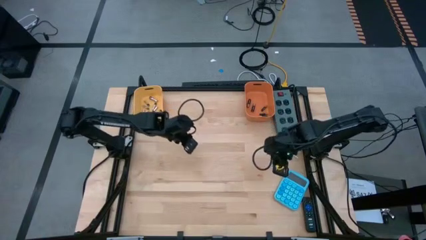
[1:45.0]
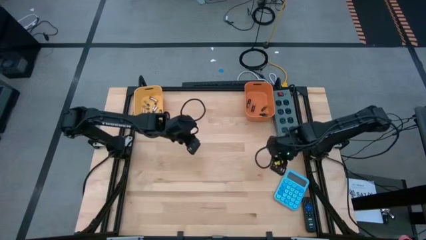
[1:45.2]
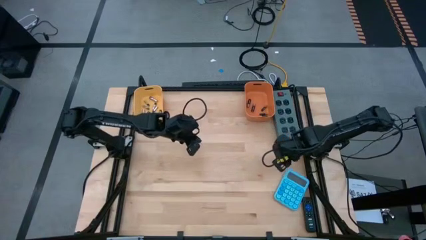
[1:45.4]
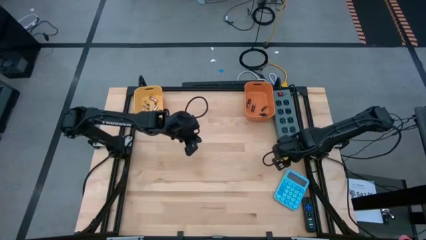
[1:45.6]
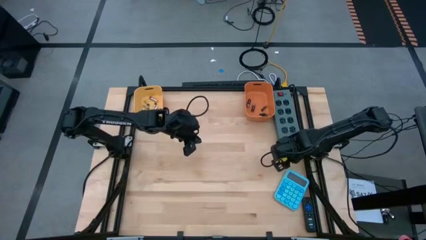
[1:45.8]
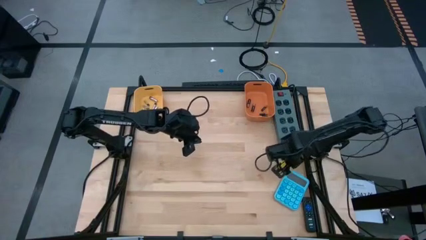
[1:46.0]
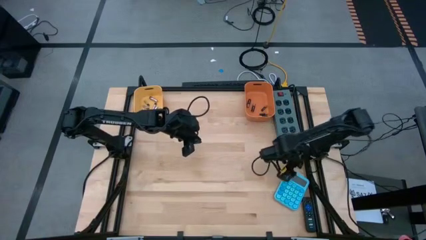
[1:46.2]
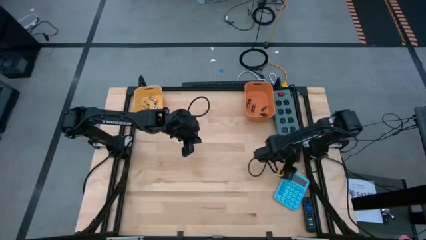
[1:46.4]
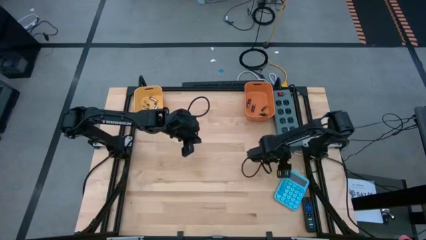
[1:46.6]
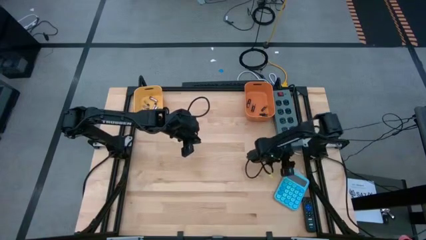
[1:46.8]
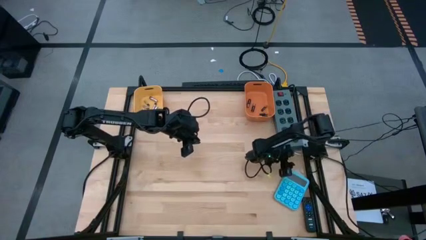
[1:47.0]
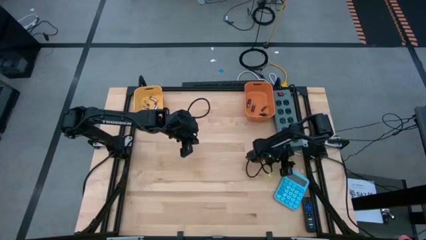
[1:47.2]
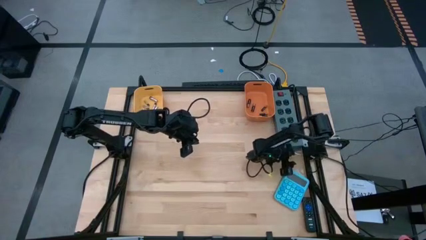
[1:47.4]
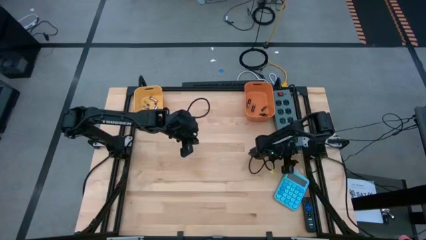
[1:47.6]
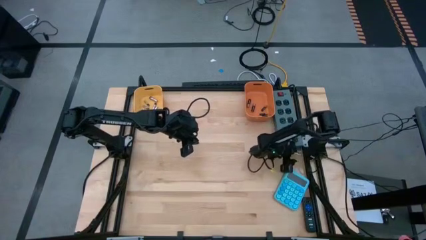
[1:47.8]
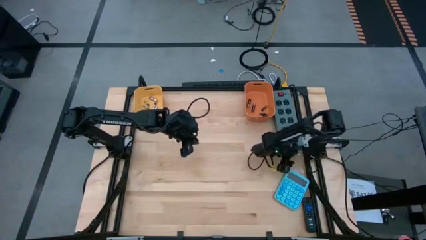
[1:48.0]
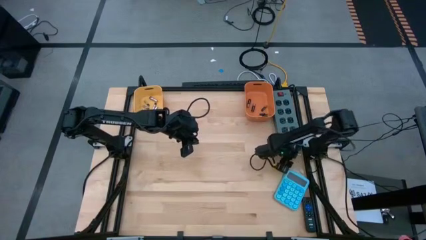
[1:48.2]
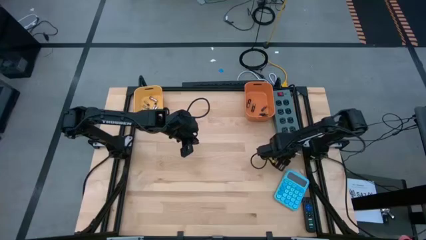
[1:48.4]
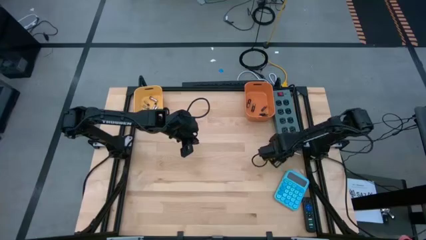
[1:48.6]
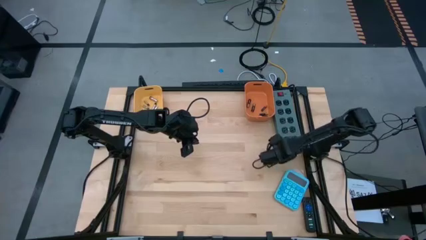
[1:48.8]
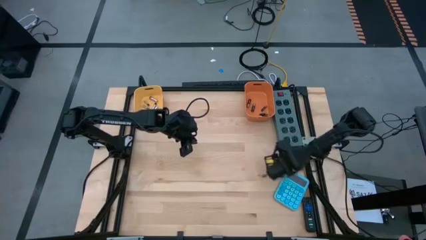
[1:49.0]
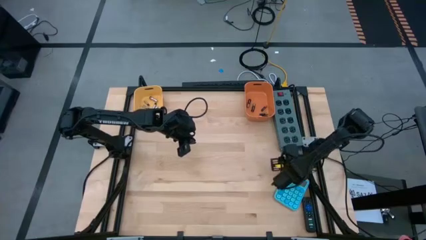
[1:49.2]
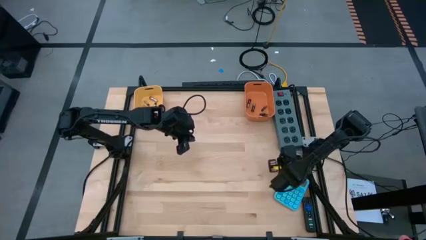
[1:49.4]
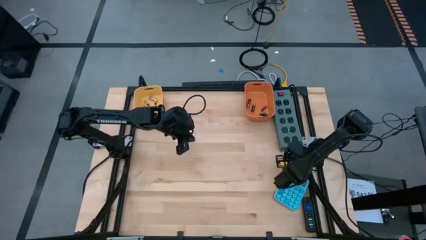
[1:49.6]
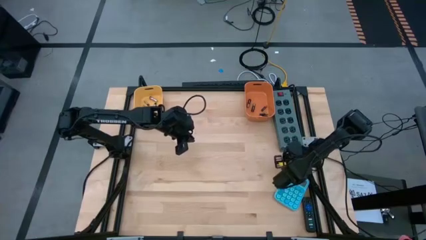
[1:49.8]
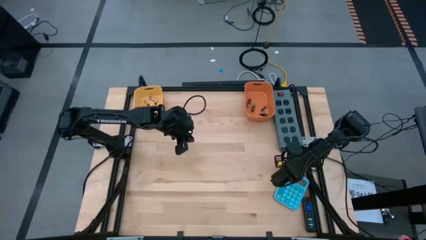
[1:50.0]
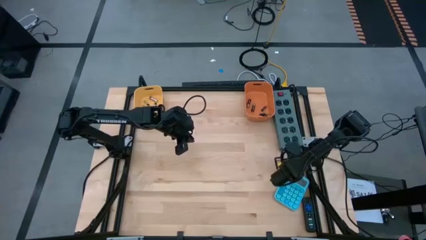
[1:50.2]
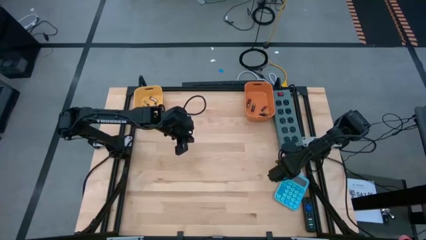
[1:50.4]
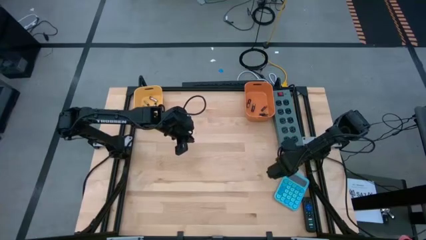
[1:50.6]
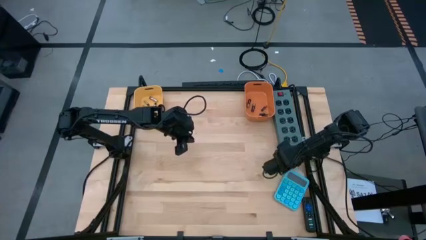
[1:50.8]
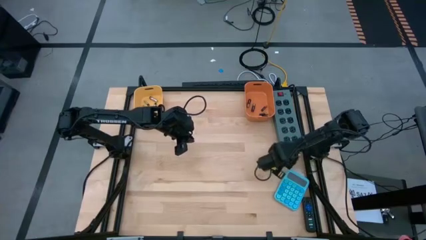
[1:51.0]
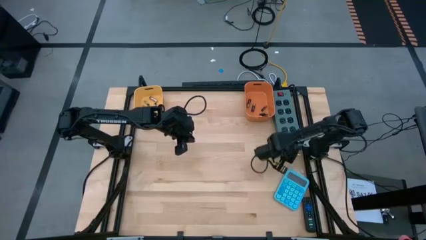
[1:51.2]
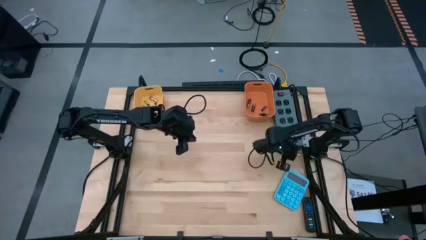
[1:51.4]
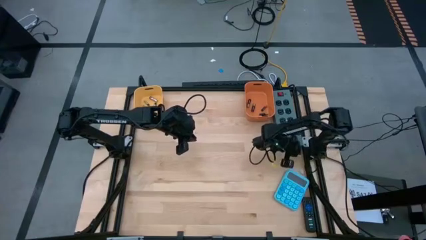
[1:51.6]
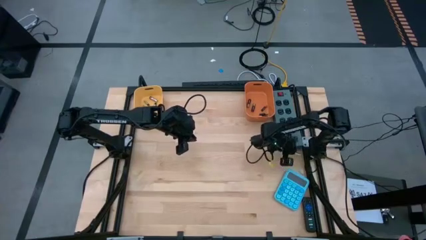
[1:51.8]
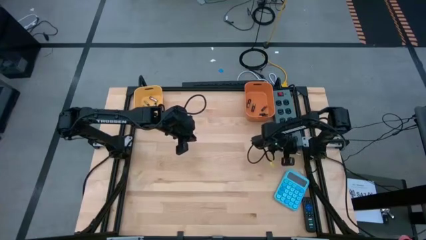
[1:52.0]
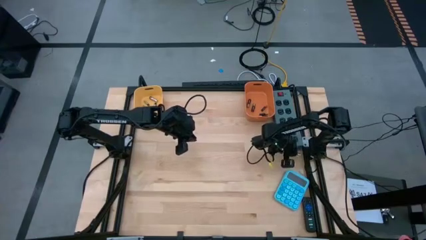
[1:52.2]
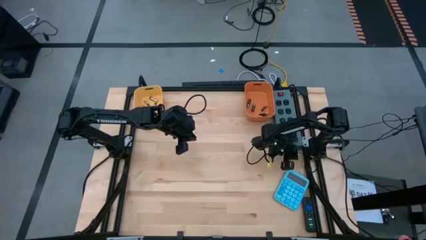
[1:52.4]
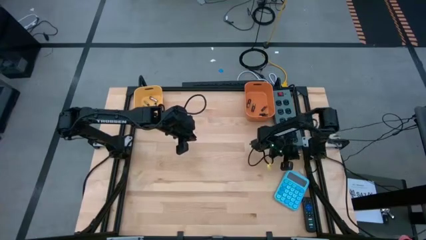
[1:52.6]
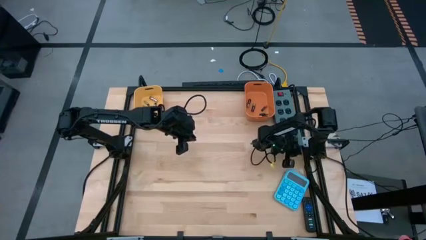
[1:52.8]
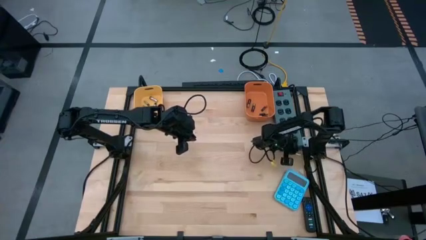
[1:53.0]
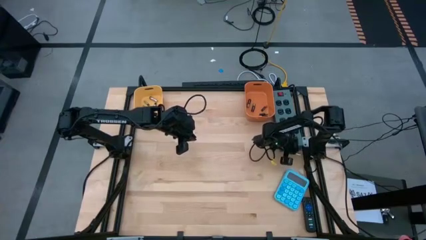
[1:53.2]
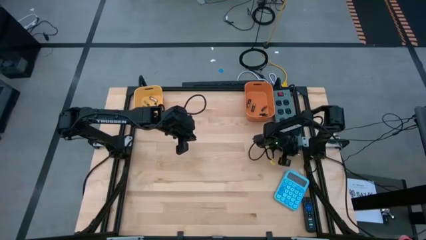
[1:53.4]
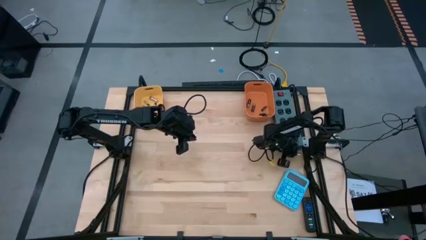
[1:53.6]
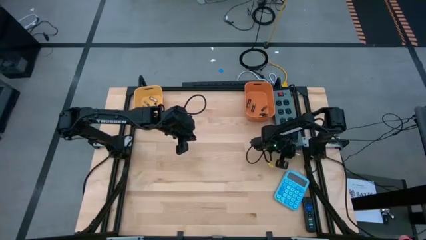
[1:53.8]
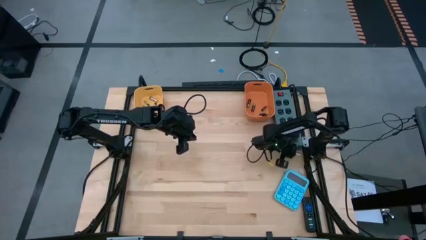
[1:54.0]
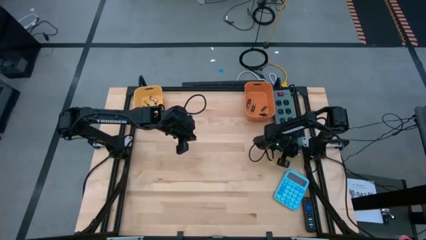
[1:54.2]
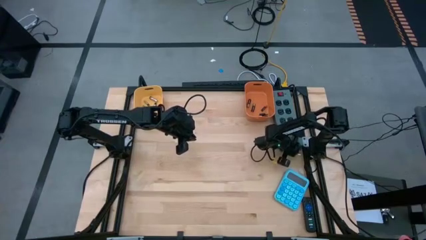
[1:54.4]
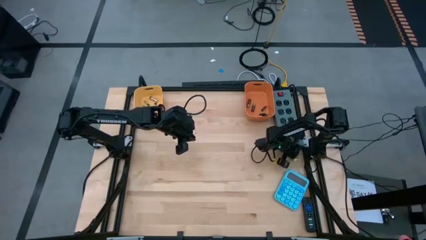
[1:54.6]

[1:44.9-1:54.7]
Task: Sort batteries
Put the silver battery into the yellow bin

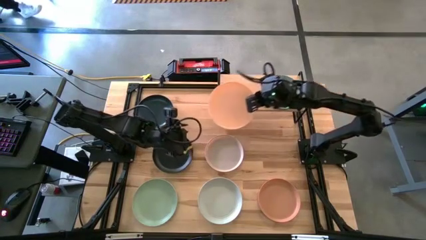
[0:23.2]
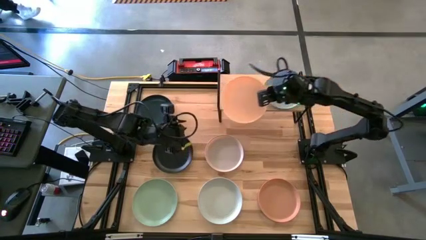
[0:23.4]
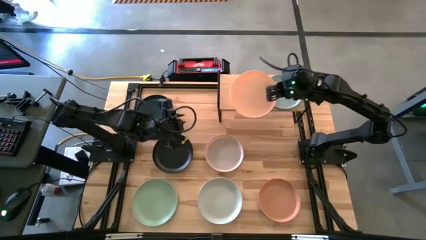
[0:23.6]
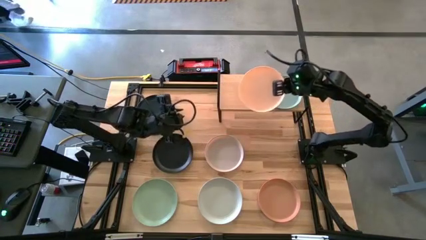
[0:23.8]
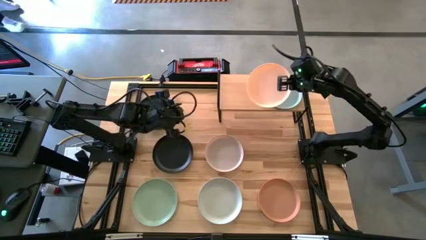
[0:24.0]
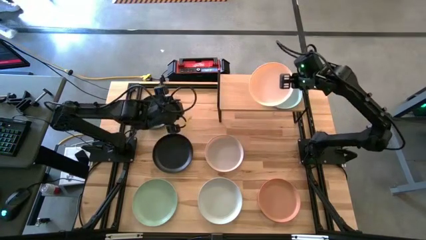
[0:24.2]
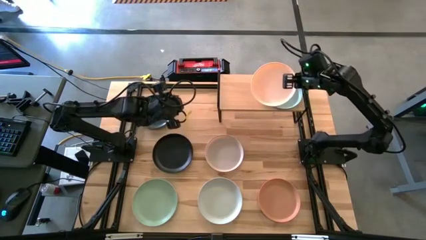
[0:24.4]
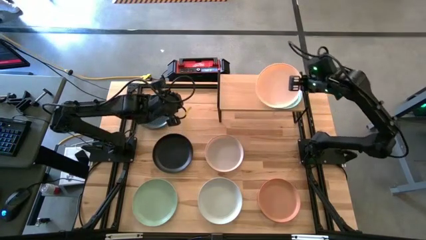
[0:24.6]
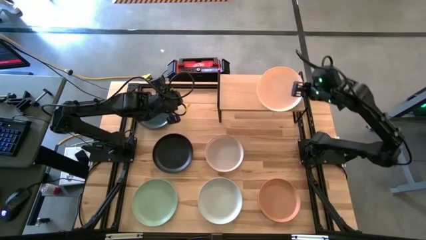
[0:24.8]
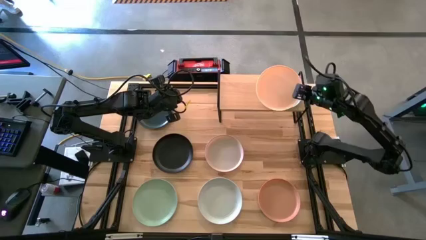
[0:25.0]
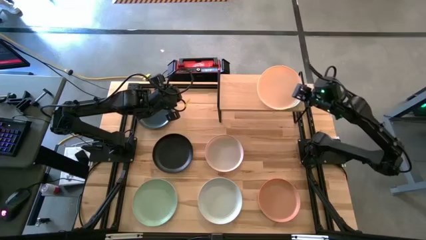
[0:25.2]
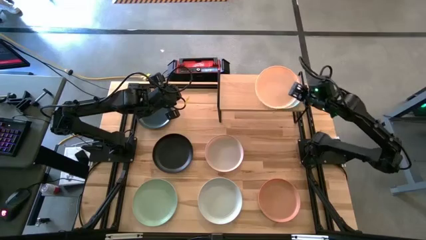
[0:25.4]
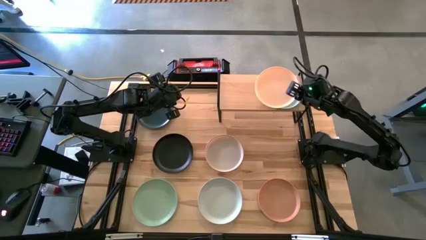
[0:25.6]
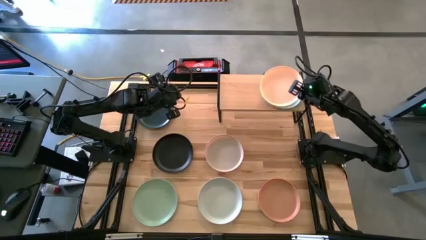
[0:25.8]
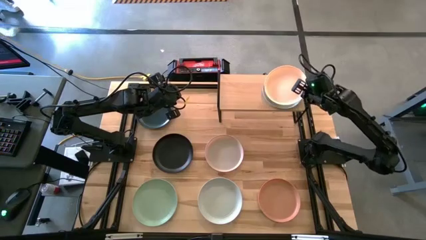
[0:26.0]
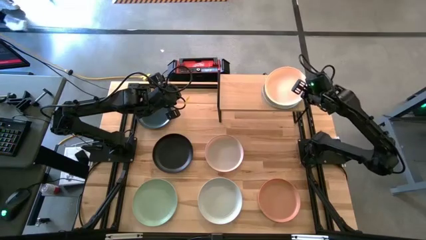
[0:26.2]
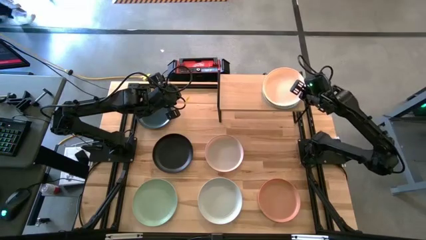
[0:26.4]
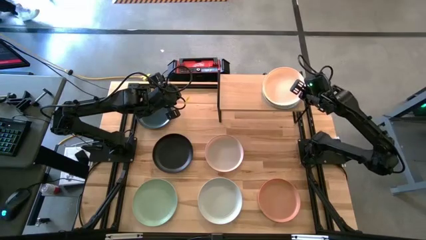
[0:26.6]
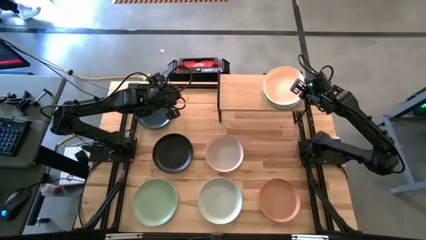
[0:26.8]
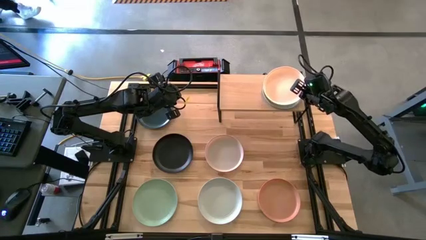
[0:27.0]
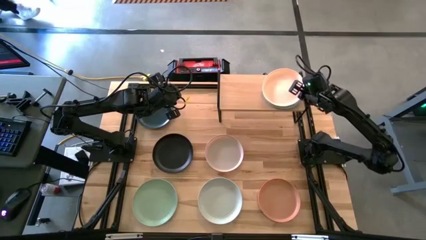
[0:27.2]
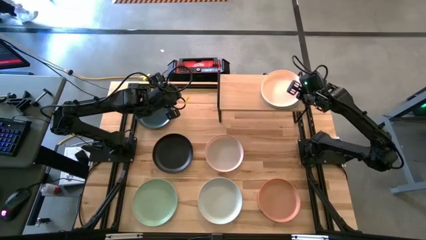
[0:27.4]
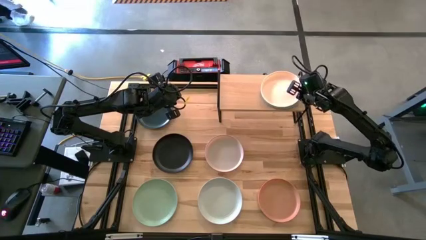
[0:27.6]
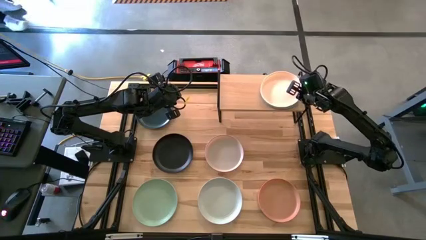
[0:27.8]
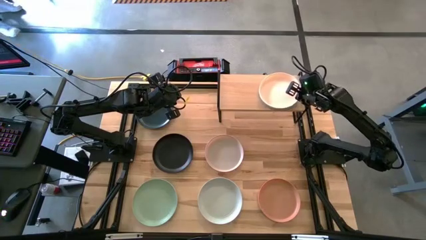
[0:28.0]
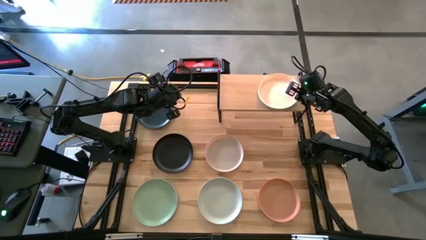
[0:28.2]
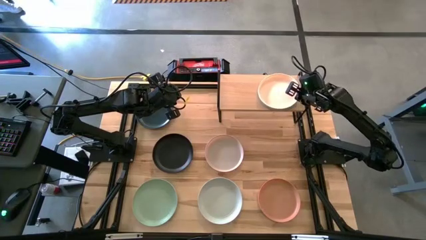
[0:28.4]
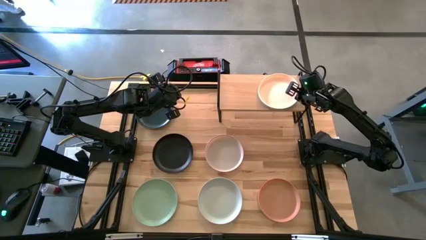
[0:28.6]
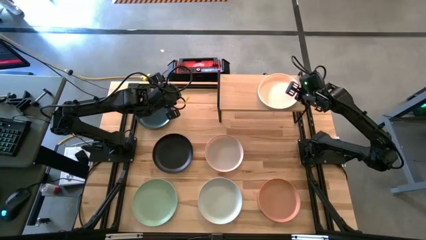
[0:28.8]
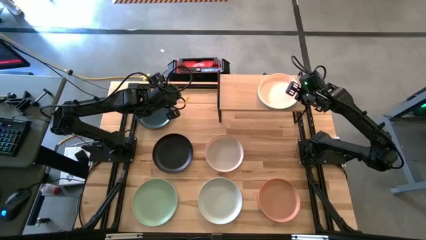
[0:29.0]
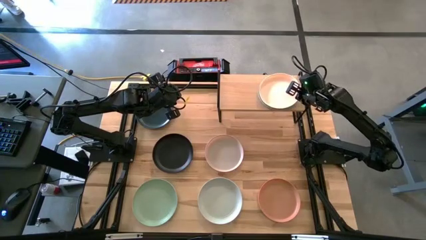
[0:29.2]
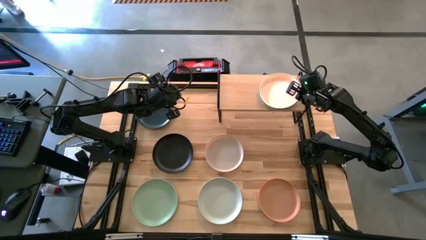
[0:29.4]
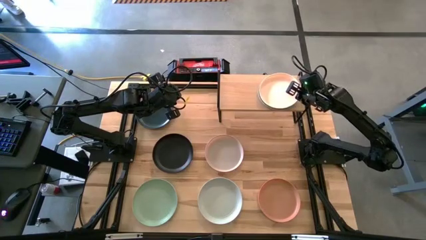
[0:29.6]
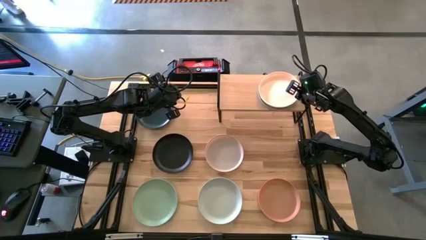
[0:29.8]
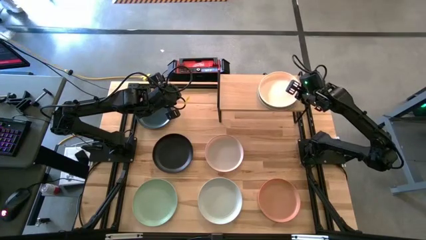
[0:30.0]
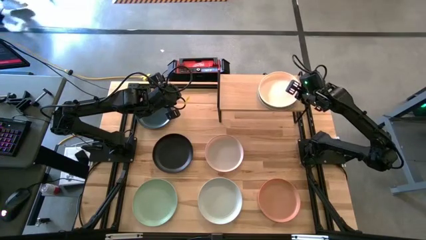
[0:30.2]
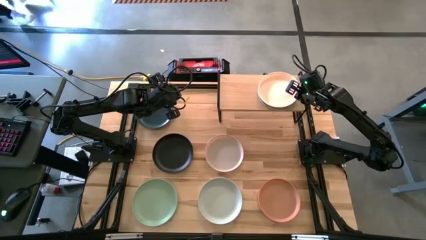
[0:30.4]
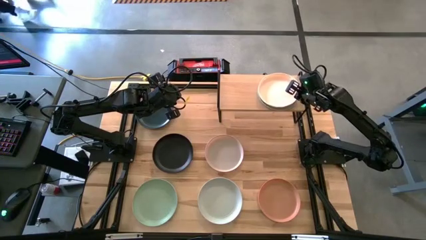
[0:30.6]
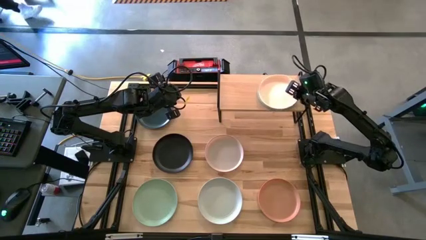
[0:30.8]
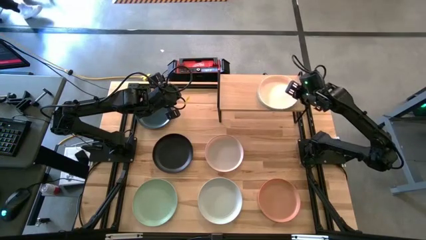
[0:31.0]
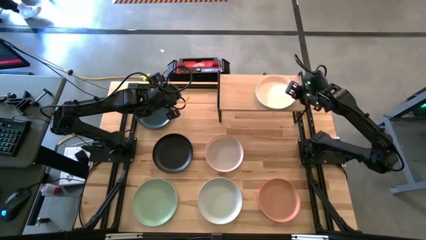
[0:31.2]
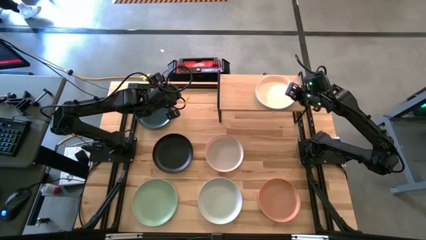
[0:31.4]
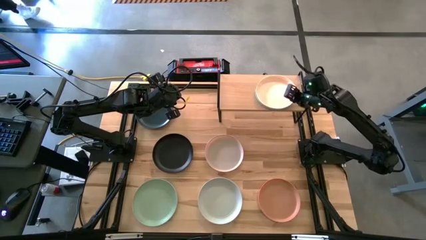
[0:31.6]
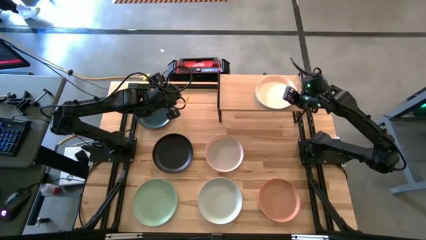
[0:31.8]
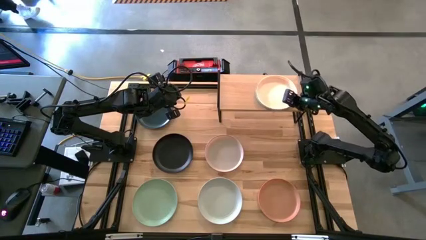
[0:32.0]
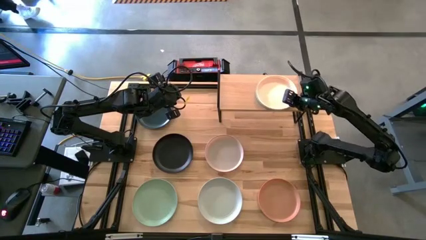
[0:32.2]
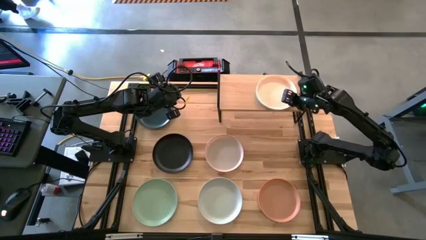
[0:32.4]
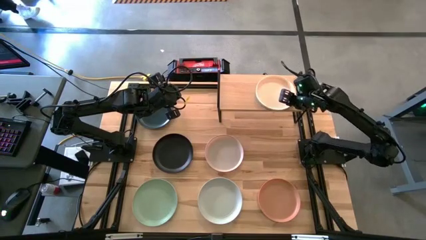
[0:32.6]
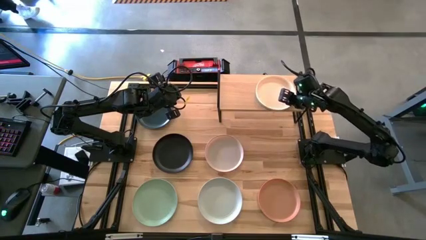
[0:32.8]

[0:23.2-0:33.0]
Task: Place and stack plates onto a shelf
Stack the pink plate on top of the light blue plate on the shelf
